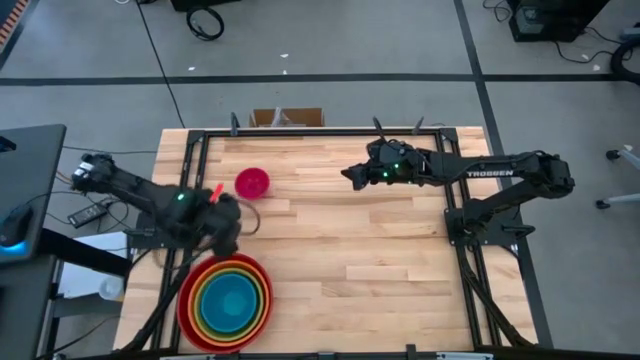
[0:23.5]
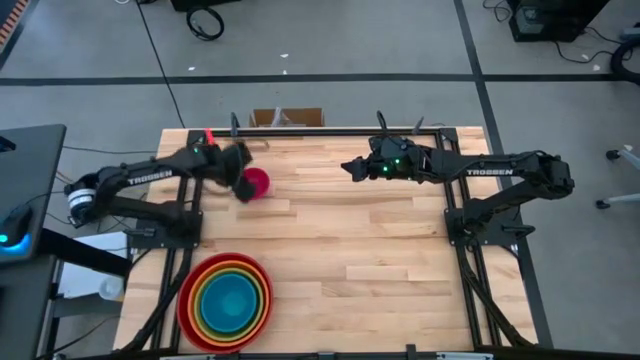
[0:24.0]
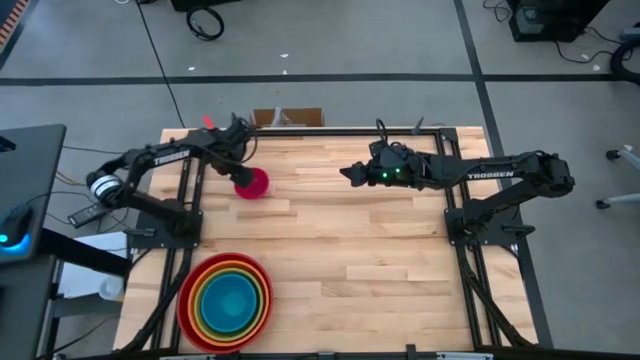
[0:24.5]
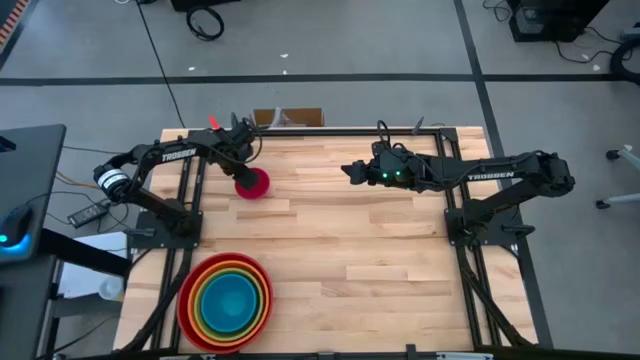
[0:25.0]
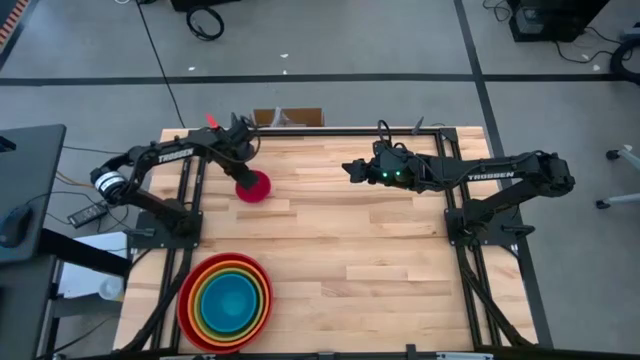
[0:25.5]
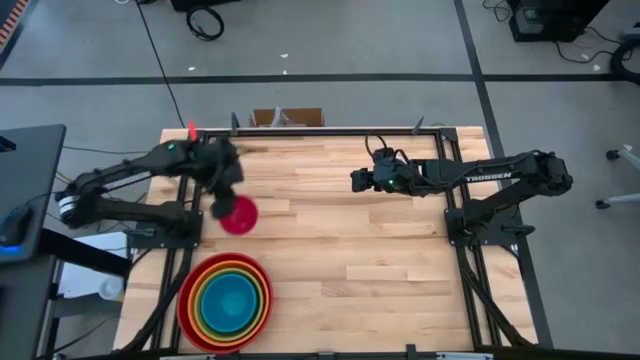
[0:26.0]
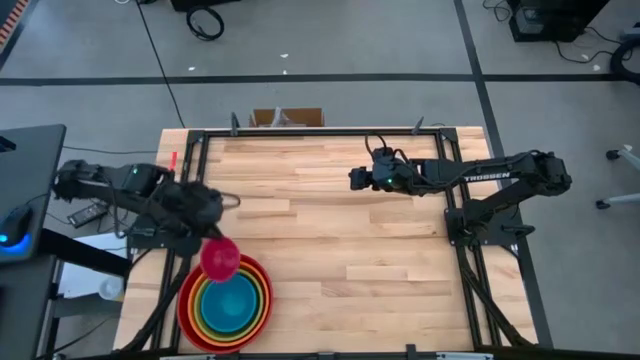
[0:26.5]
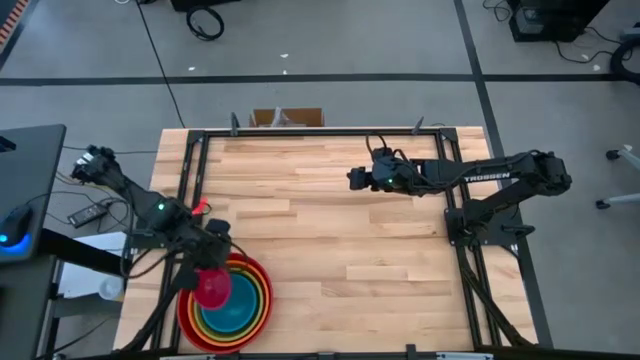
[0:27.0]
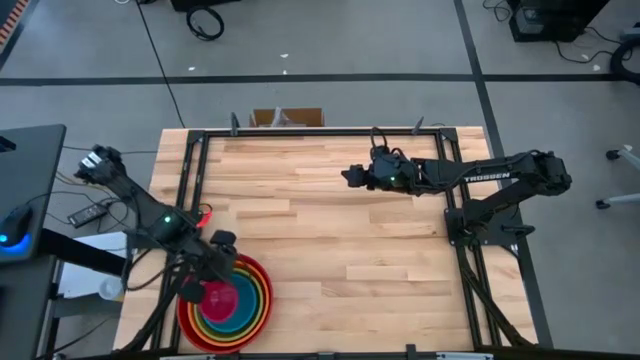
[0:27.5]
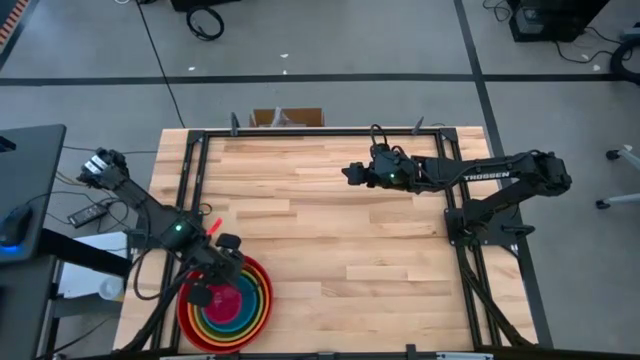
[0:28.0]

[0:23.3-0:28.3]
Stack the red bowl on top of the blue bowl

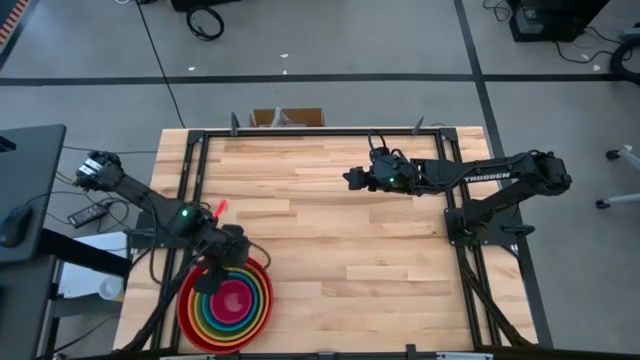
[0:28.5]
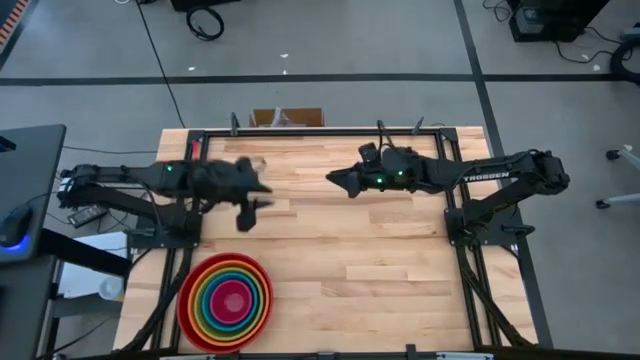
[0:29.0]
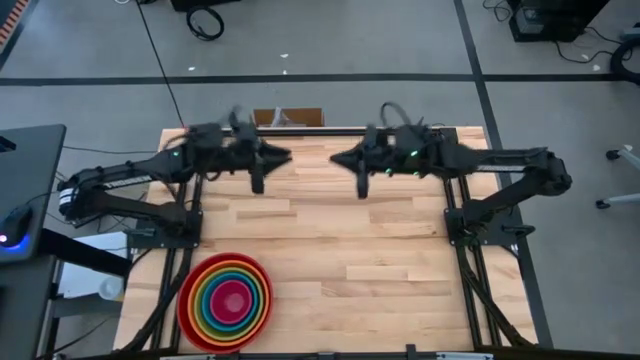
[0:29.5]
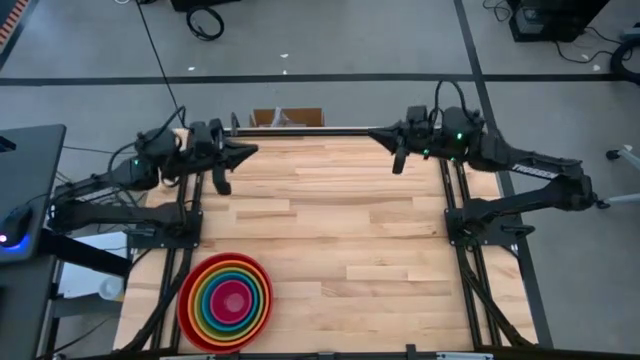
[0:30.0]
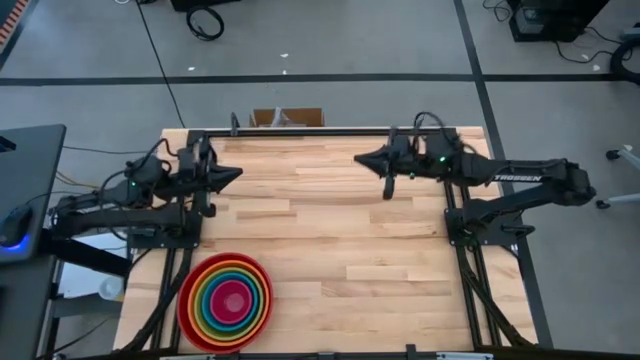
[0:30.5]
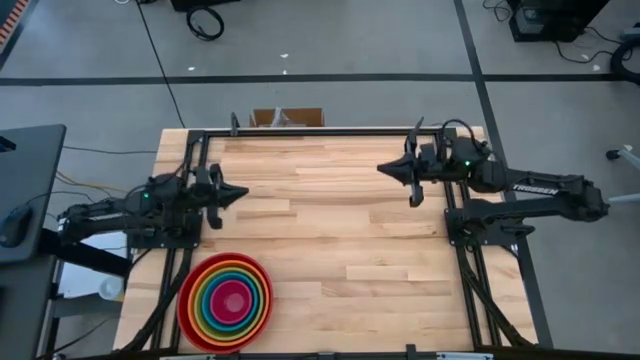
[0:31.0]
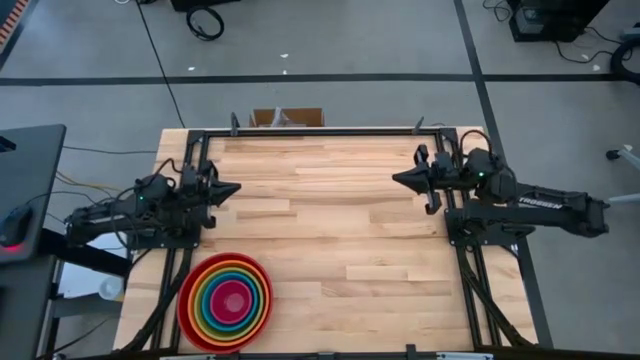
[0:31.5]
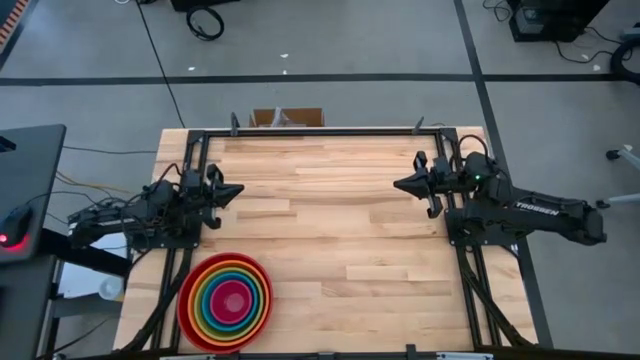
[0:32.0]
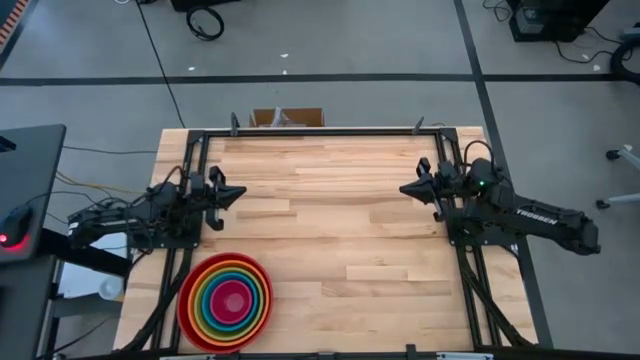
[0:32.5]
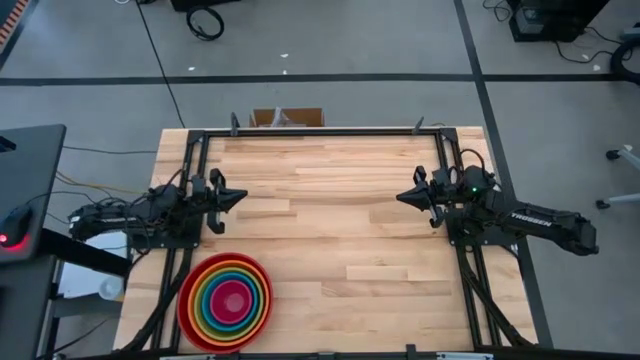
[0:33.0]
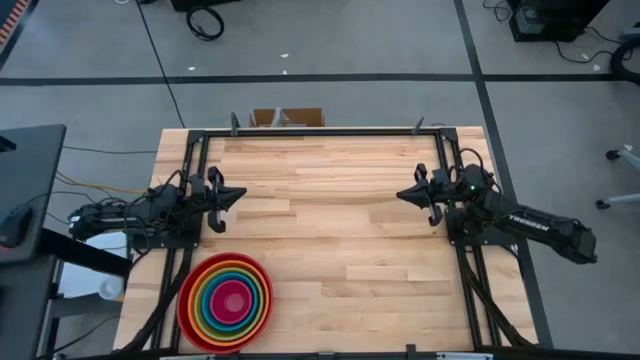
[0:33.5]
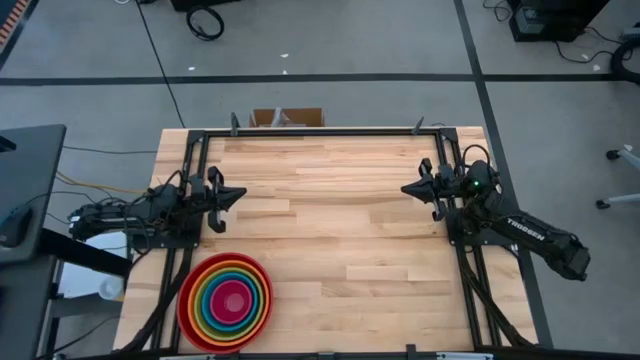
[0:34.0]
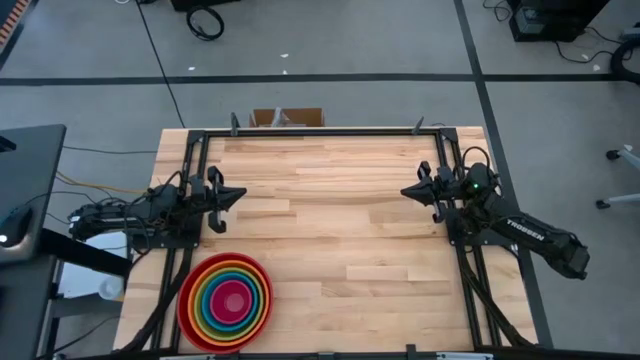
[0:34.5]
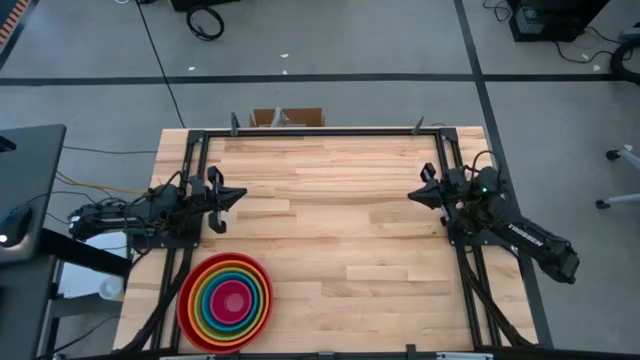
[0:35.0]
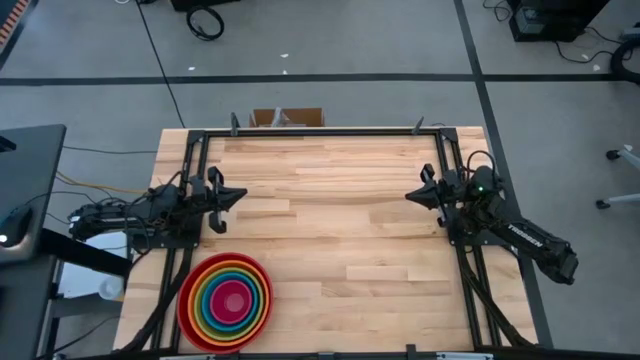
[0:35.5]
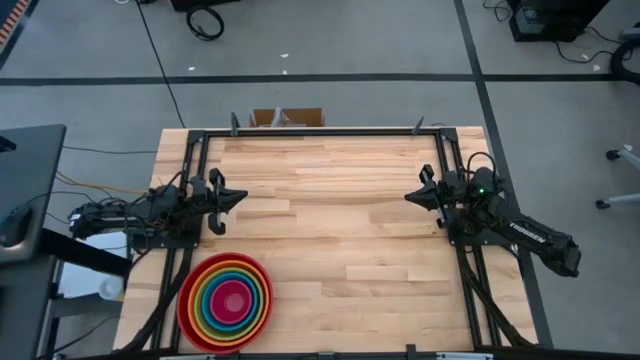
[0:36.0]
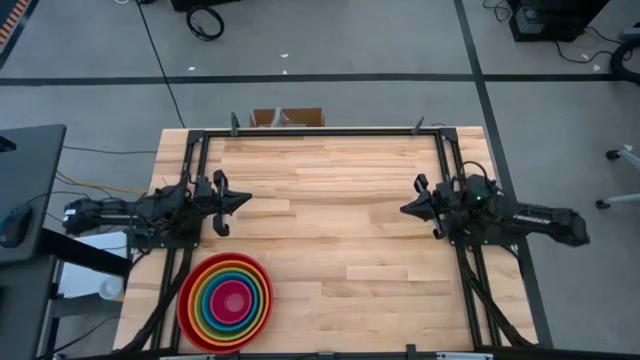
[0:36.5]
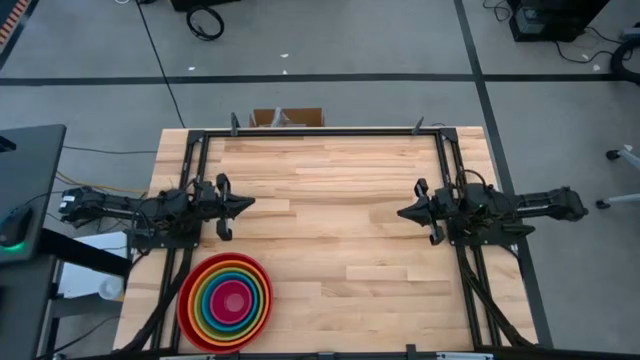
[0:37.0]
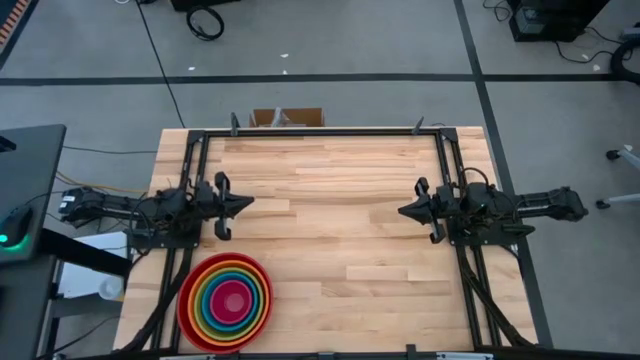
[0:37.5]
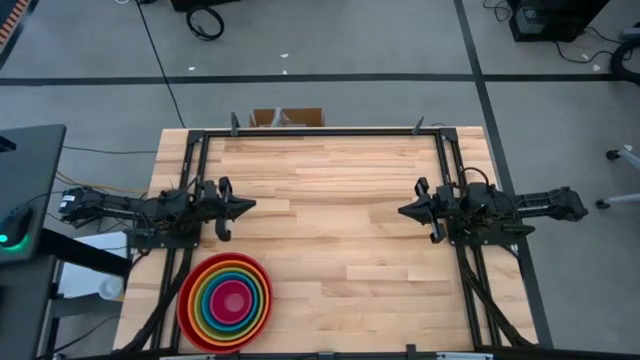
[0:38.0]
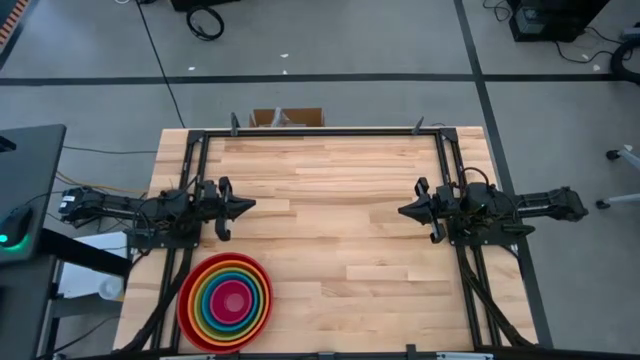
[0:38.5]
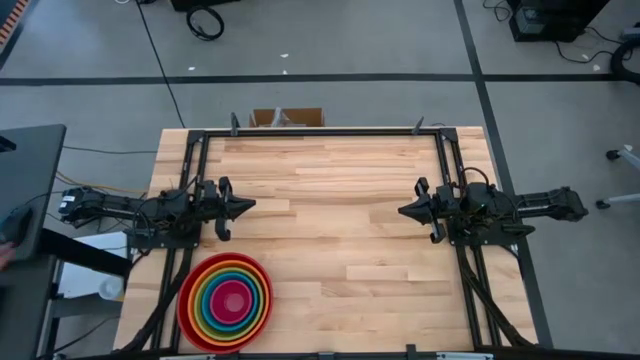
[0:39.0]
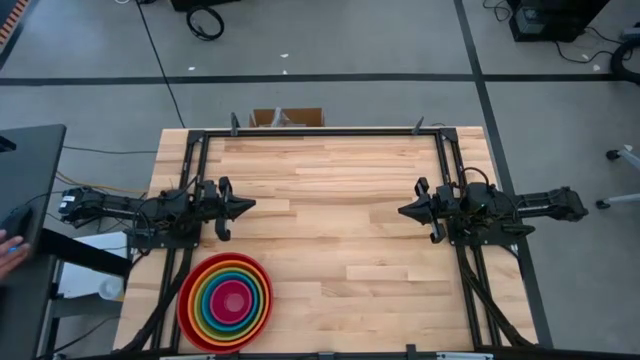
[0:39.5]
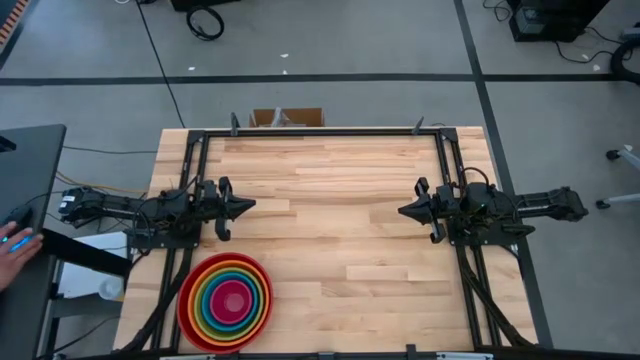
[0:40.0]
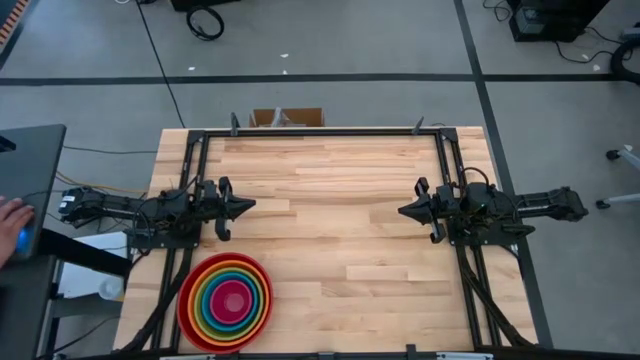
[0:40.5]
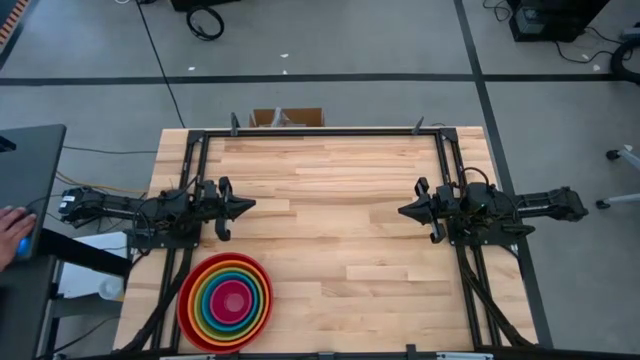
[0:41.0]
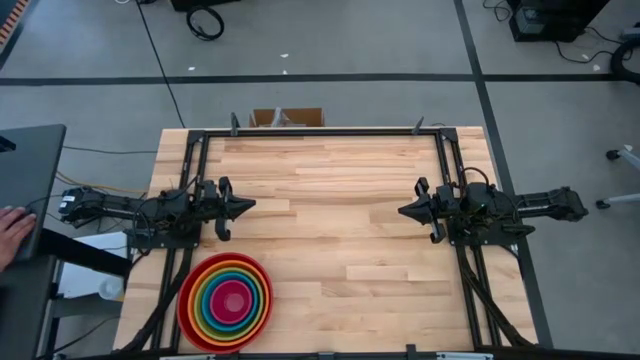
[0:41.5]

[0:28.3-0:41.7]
Return to Home Position
